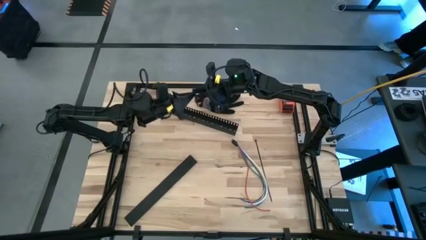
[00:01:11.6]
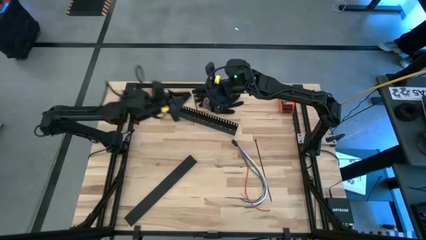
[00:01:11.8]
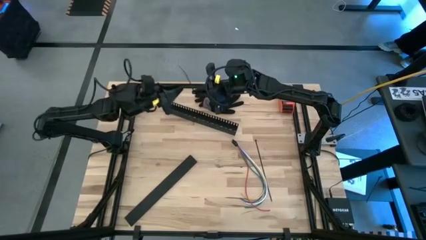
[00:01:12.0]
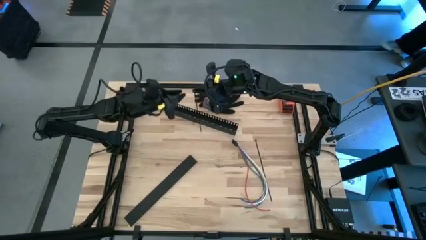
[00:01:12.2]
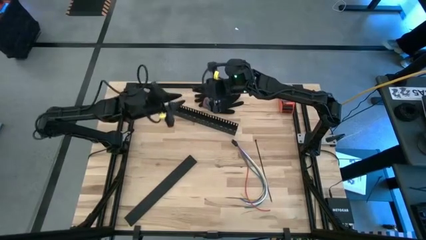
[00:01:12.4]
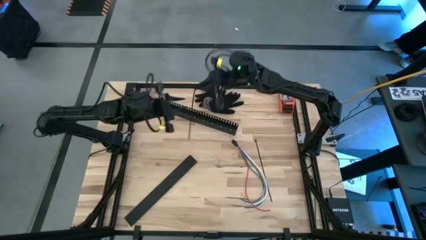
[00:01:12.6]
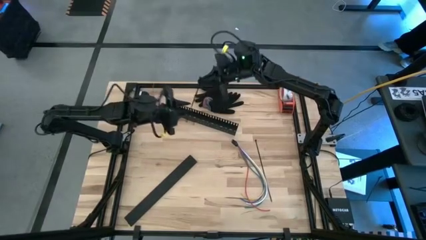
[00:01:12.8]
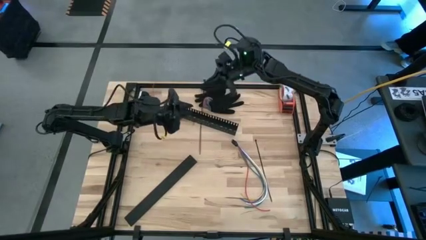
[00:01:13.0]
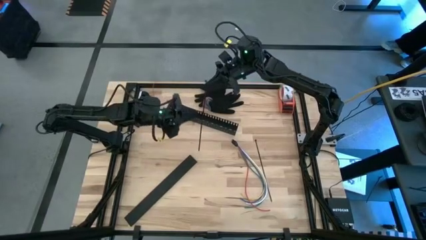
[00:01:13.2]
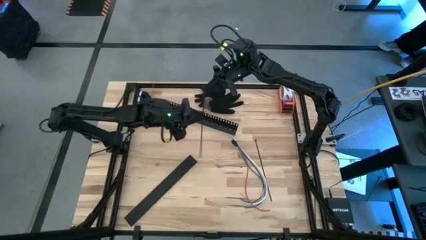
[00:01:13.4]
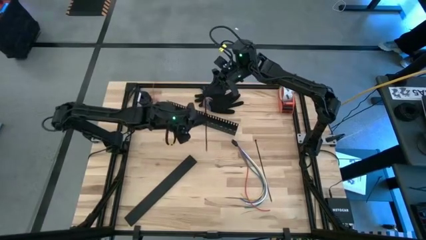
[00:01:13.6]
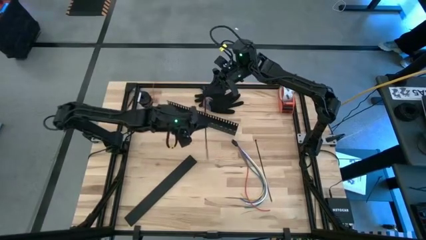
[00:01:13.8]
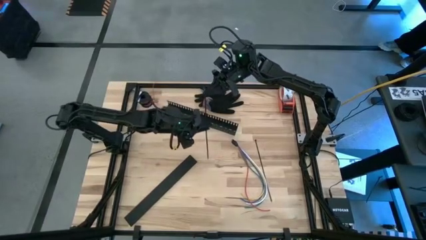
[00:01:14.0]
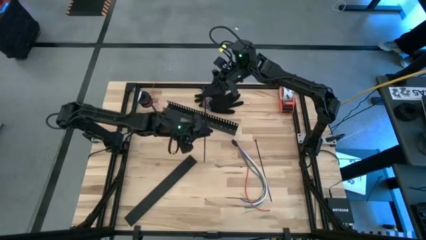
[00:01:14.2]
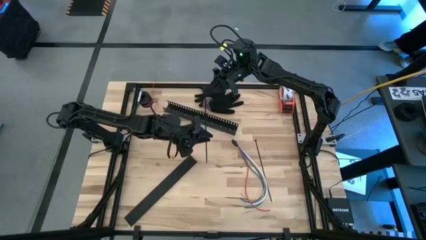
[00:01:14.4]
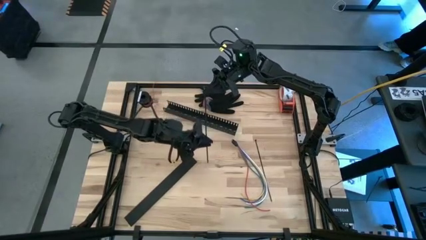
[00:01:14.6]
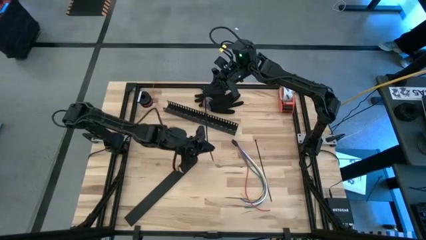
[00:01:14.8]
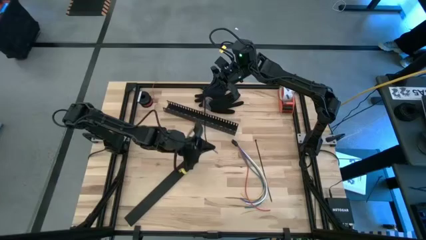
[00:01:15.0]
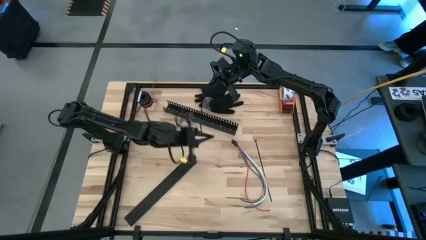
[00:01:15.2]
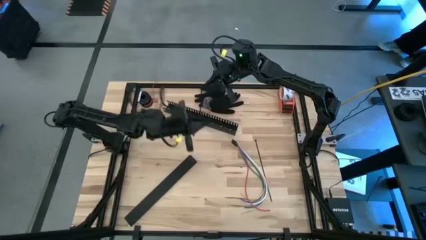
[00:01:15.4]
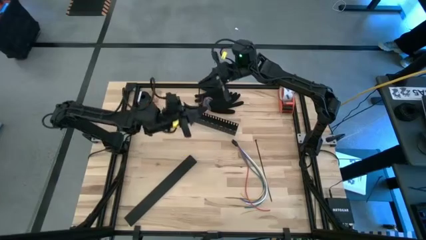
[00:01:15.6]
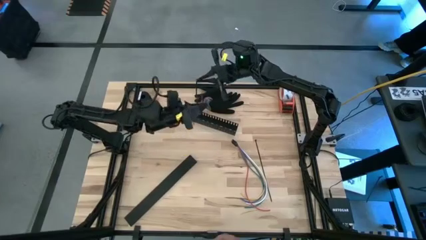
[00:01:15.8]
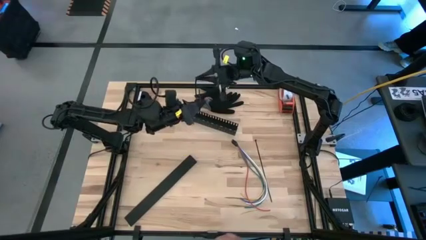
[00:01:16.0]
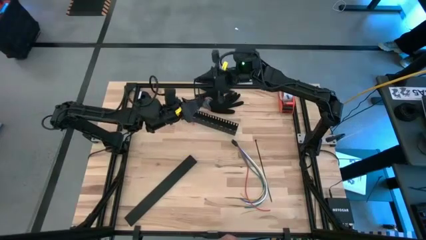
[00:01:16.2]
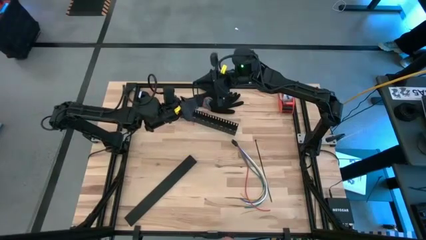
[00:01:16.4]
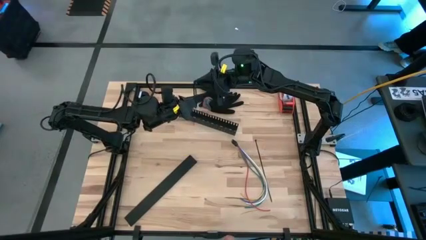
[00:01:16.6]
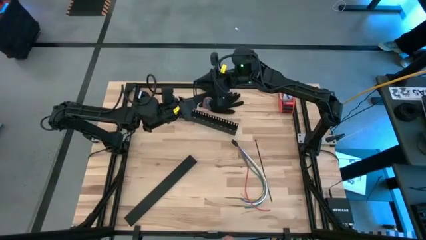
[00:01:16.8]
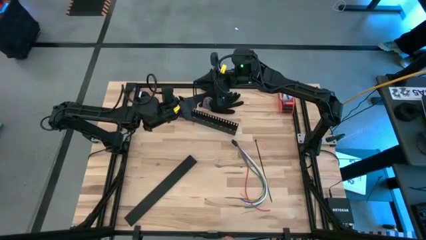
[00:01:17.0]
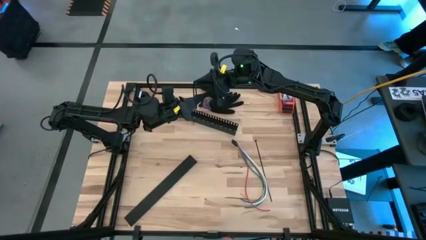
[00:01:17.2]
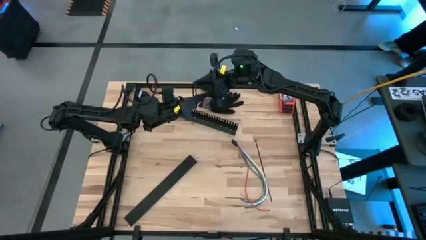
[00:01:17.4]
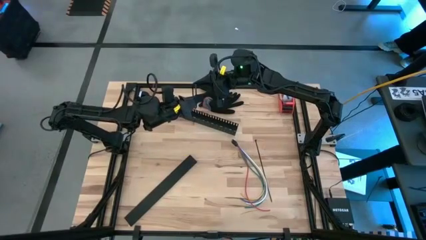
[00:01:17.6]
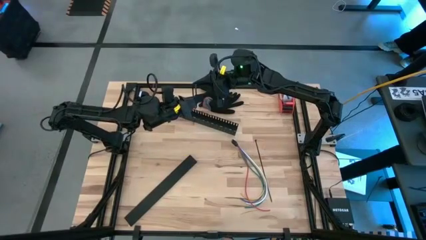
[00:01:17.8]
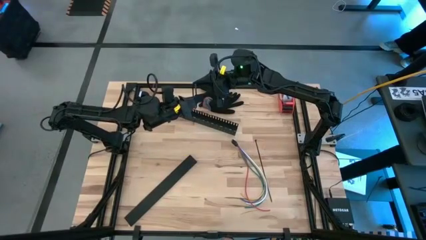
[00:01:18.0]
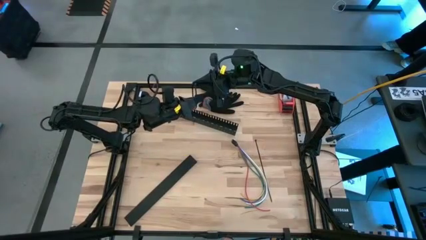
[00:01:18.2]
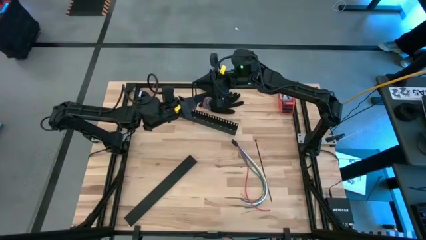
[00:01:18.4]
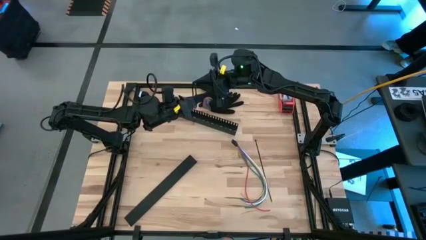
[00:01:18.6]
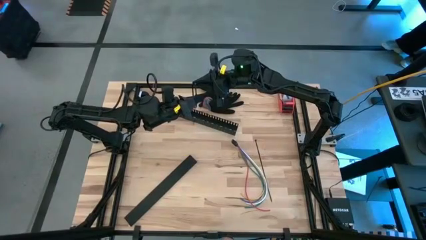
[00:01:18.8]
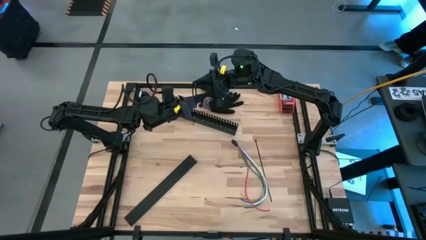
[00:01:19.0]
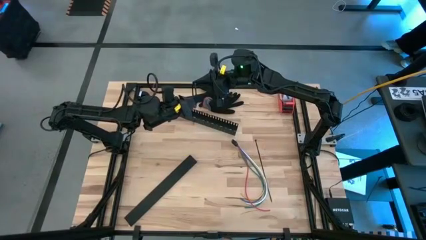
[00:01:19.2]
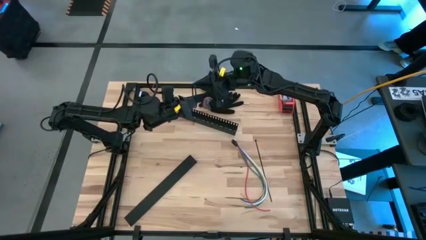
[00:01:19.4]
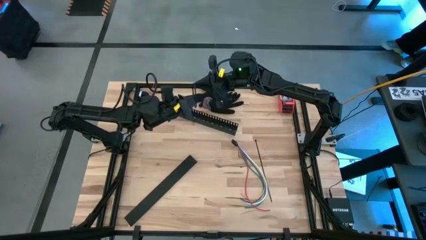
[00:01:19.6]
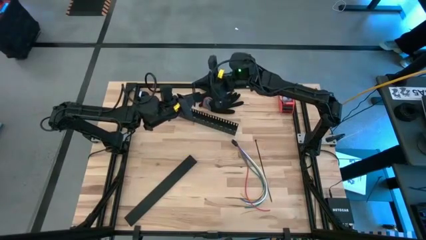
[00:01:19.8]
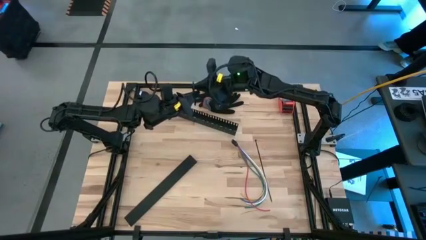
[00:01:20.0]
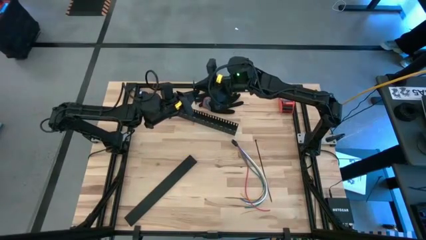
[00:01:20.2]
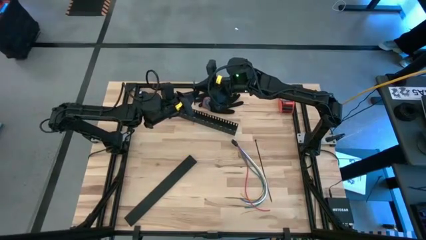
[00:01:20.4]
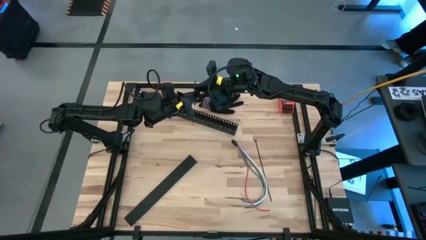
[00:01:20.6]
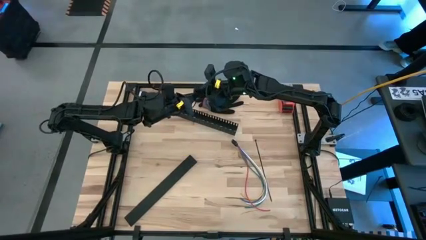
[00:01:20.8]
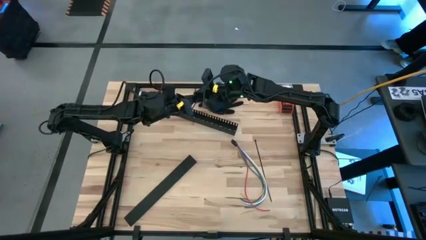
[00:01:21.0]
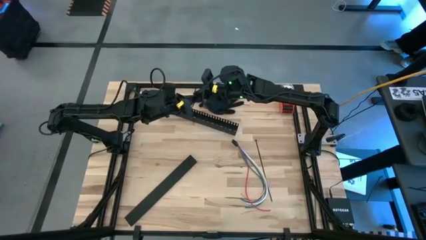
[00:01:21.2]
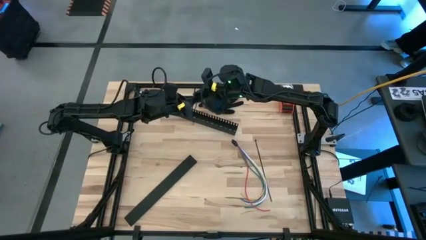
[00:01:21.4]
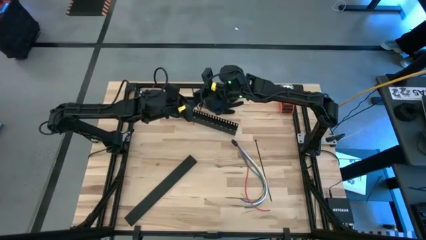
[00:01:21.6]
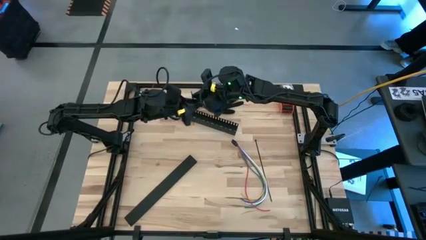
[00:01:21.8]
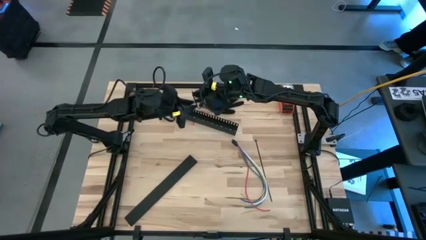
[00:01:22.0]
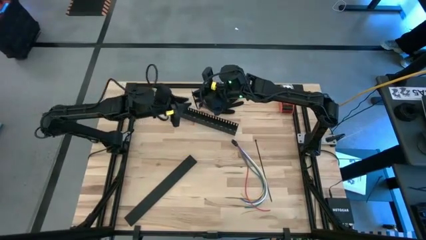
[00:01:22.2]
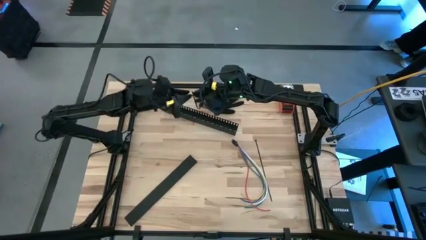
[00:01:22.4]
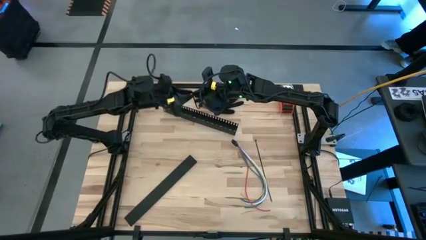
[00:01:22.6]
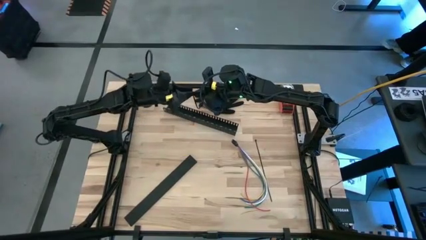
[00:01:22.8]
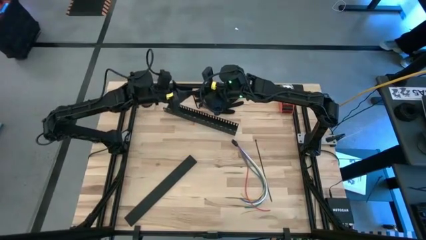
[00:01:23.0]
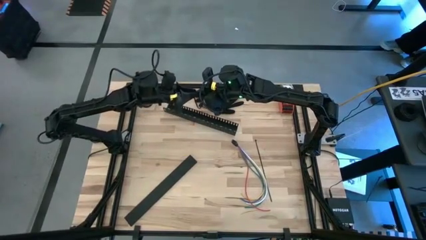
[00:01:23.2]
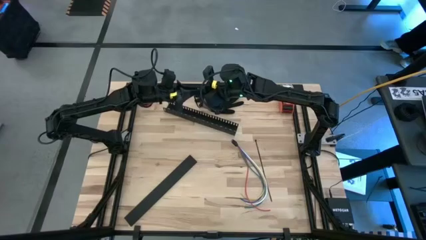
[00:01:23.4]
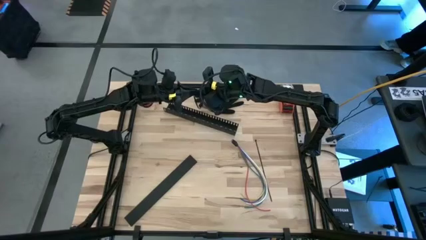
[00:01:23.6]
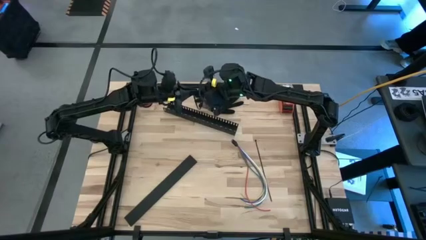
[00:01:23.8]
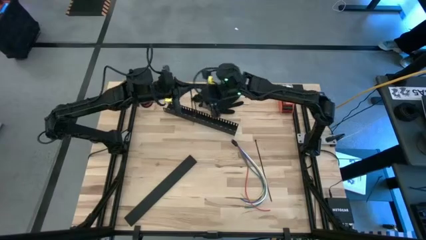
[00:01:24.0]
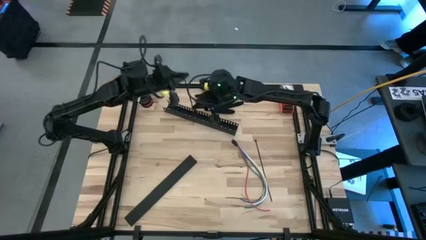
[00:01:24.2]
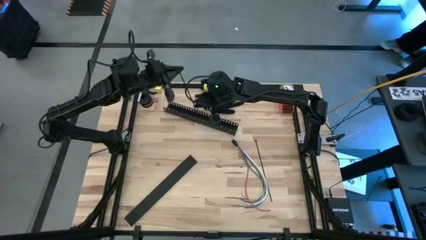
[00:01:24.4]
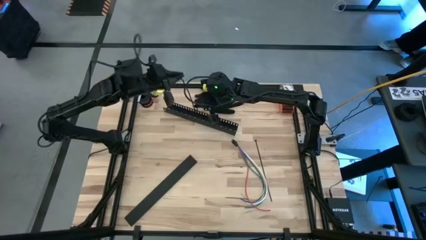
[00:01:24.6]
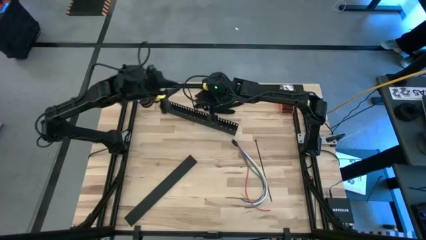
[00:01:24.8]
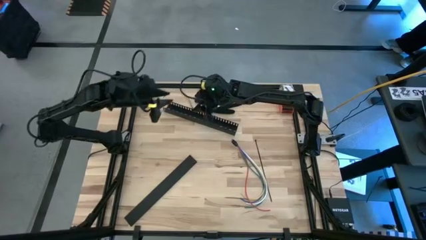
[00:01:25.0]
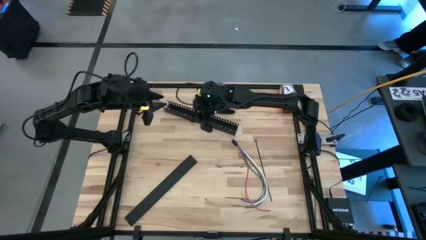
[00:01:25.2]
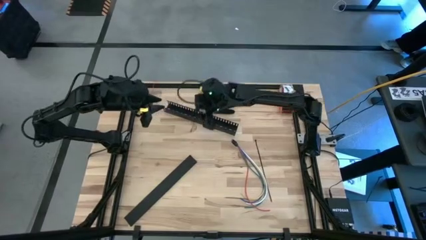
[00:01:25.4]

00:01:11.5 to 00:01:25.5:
Task: Ziptie cables
Prepare the black zip tie
